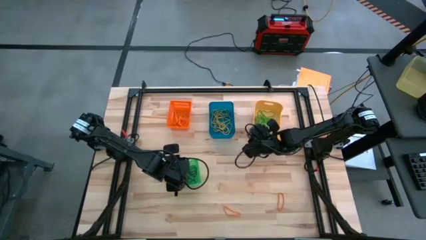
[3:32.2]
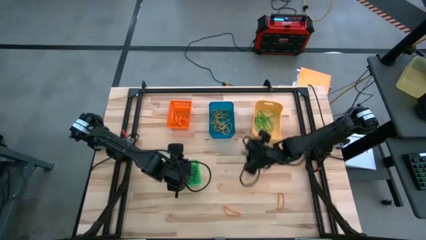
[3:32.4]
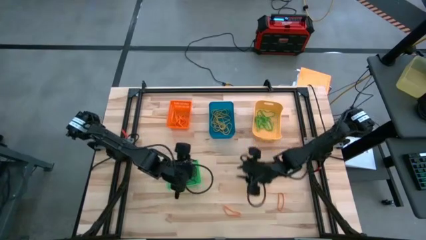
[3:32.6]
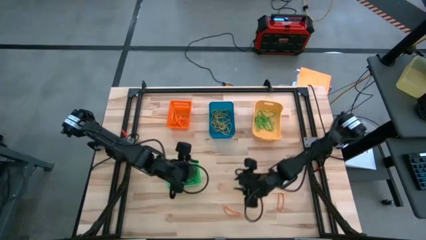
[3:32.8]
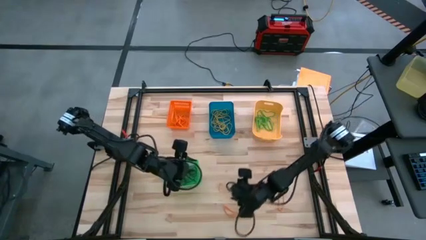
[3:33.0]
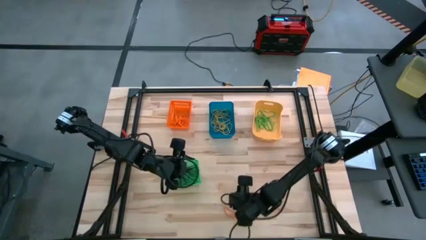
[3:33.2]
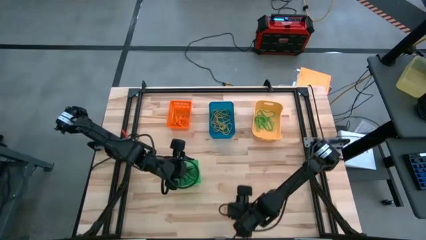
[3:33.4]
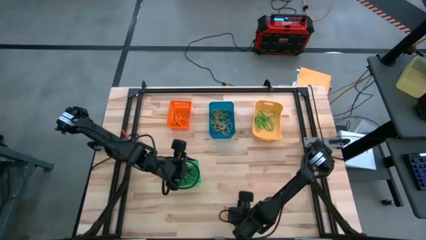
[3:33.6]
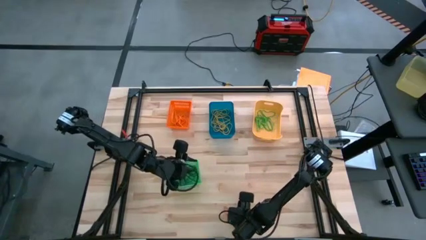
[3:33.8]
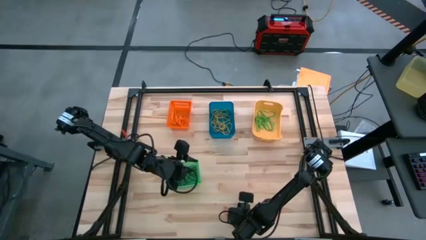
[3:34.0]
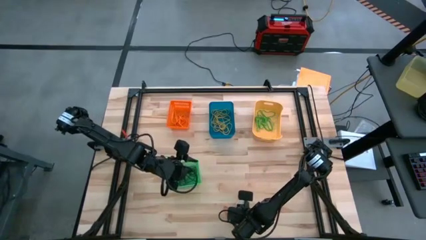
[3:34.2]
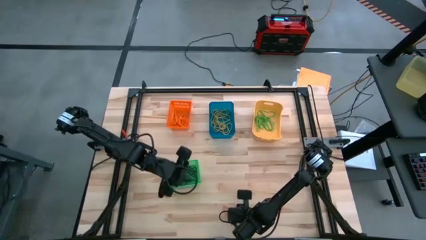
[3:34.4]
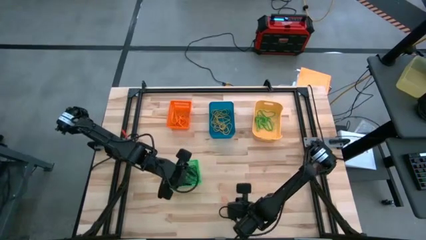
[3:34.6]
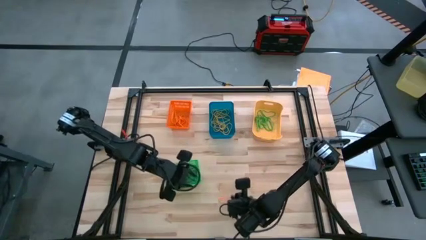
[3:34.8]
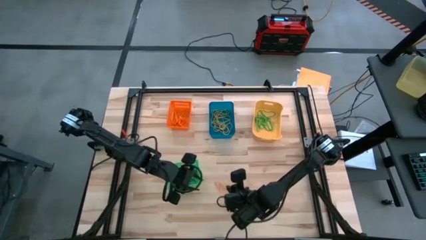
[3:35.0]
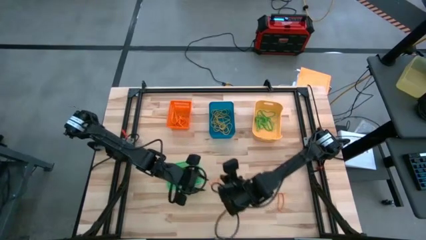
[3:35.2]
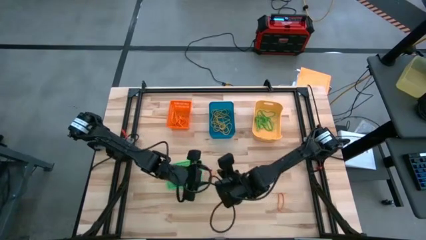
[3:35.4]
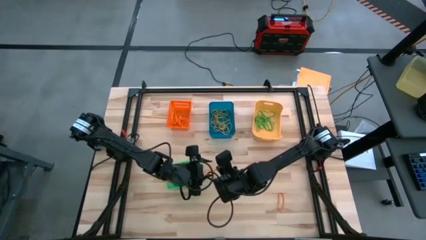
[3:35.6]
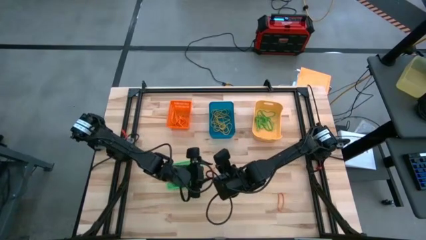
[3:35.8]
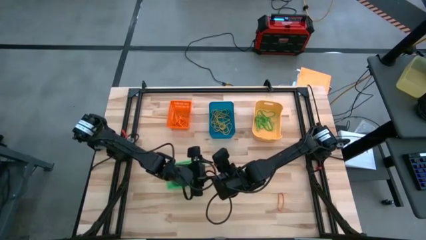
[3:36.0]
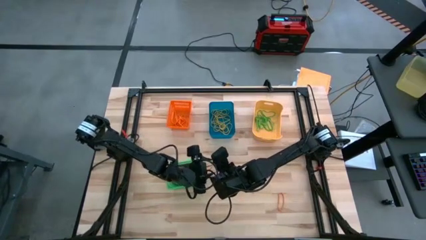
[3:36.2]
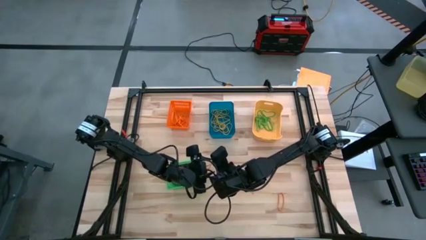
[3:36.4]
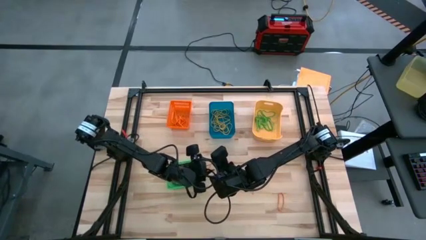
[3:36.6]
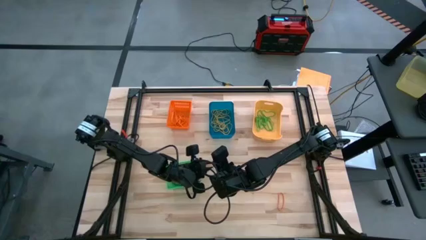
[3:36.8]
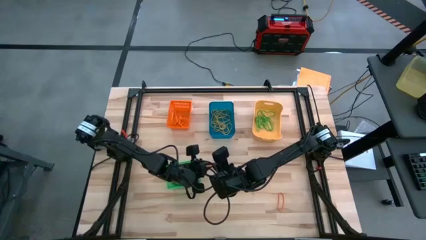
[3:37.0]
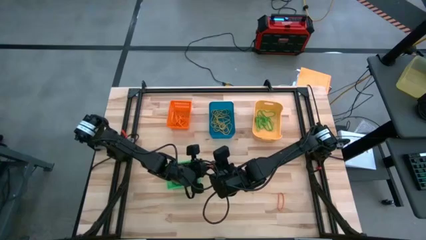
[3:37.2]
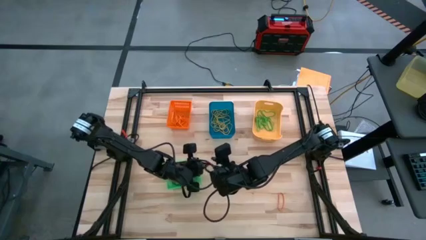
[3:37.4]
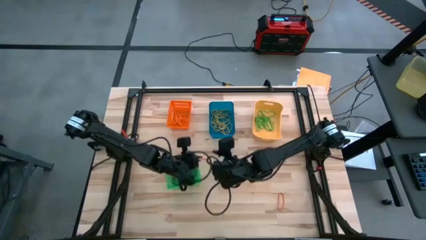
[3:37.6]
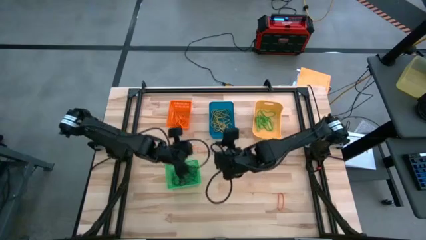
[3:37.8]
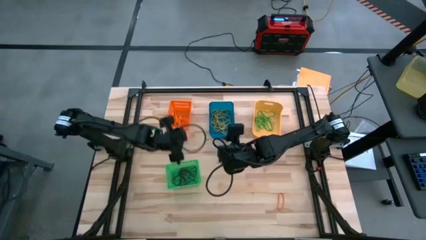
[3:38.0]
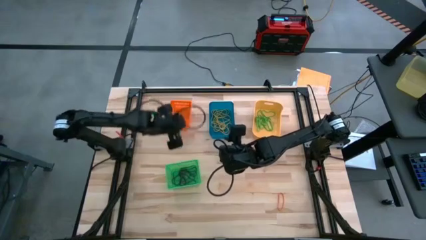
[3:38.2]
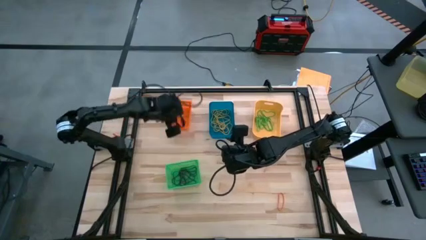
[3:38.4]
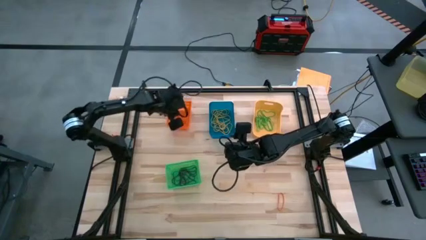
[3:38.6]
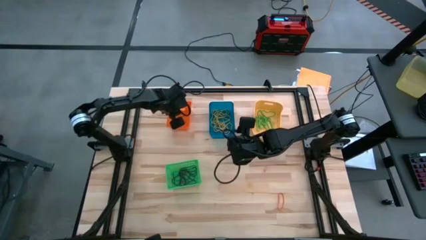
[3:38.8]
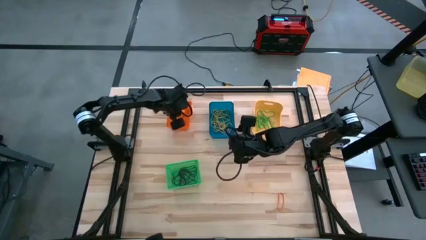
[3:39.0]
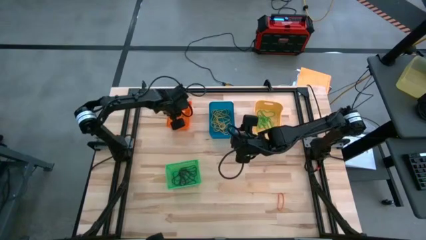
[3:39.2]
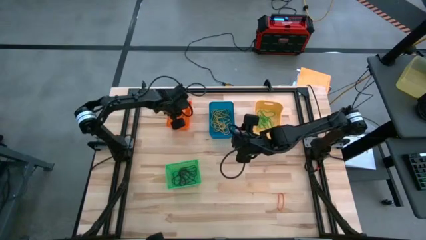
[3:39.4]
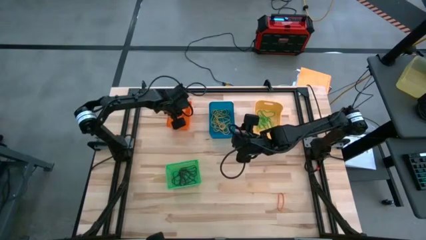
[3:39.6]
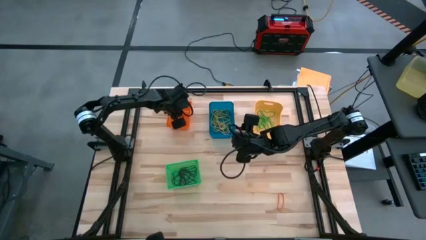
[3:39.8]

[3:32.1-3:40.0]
Task: Sort rubber bands into baskets
Put the orange rubberband into the orange bin

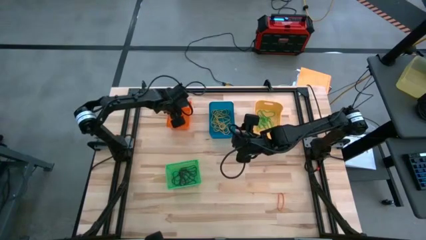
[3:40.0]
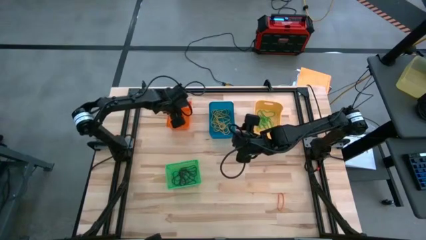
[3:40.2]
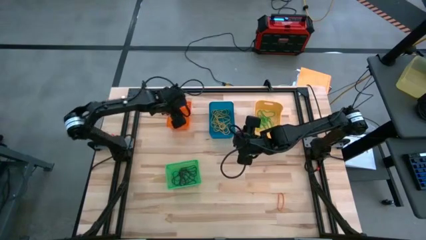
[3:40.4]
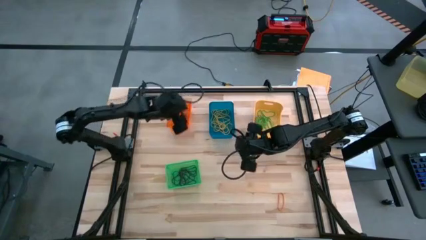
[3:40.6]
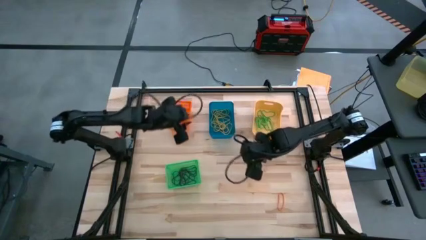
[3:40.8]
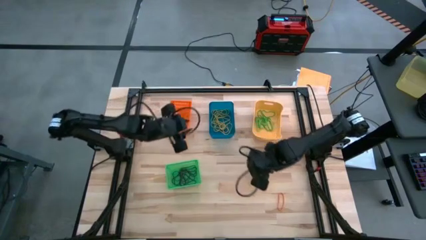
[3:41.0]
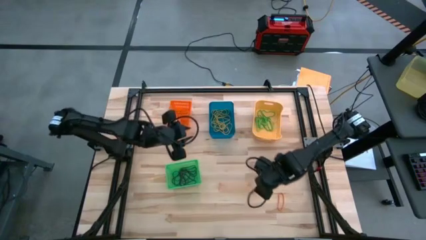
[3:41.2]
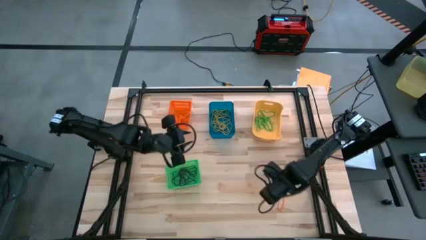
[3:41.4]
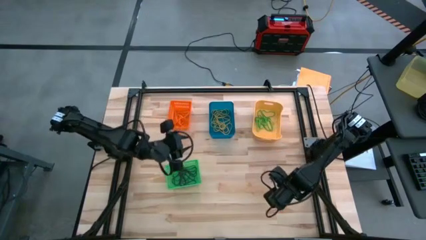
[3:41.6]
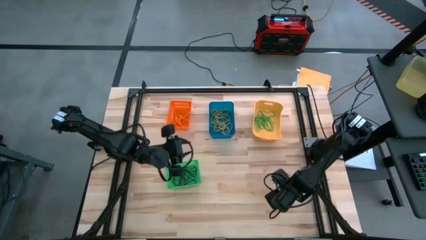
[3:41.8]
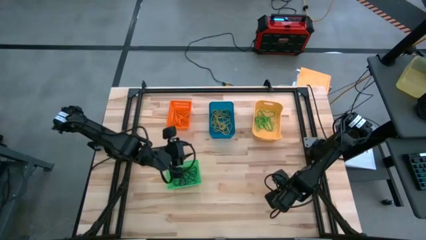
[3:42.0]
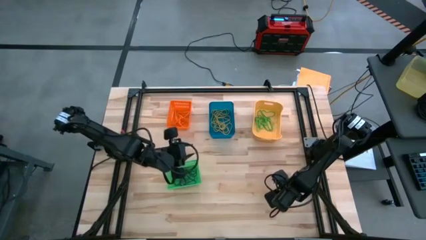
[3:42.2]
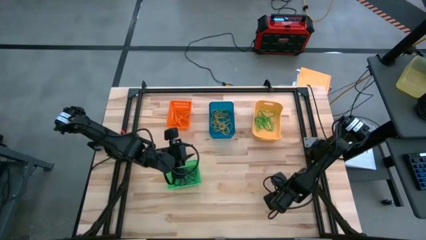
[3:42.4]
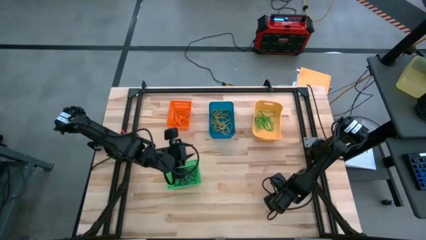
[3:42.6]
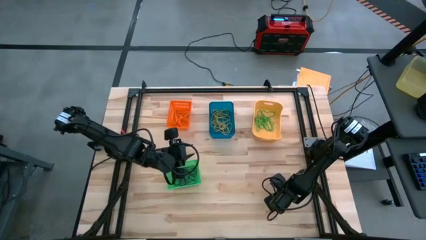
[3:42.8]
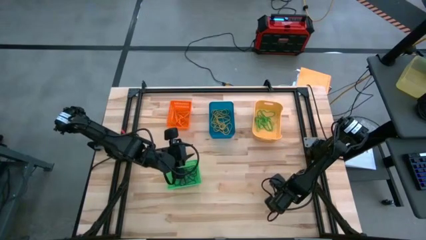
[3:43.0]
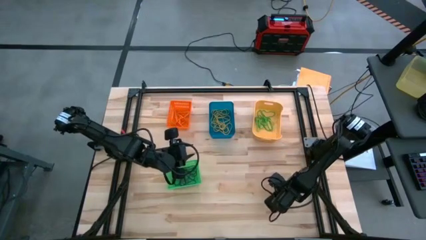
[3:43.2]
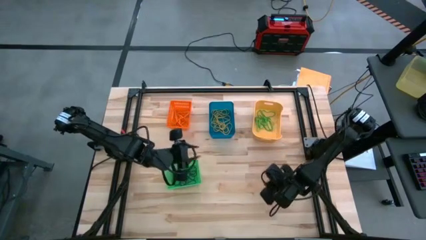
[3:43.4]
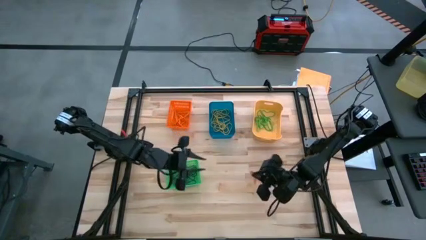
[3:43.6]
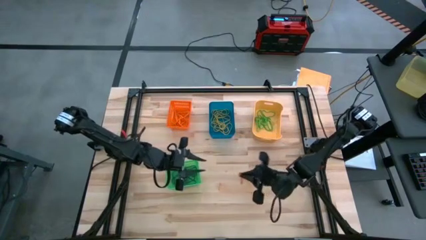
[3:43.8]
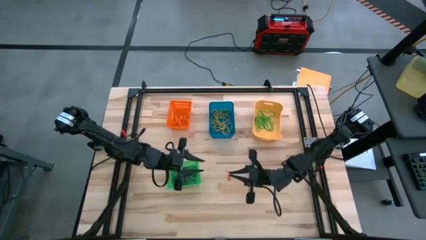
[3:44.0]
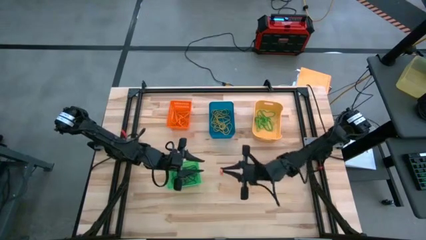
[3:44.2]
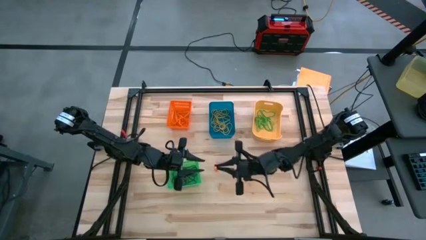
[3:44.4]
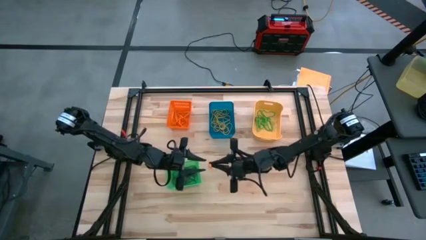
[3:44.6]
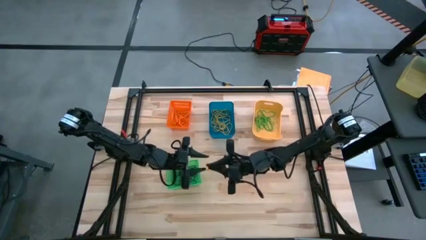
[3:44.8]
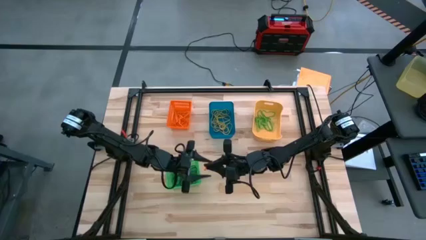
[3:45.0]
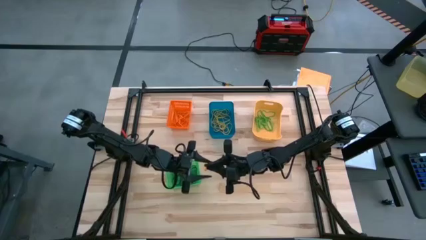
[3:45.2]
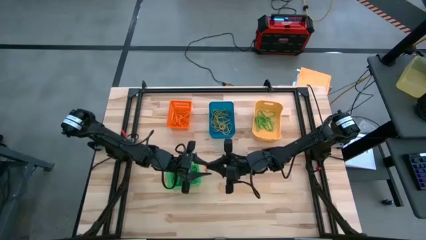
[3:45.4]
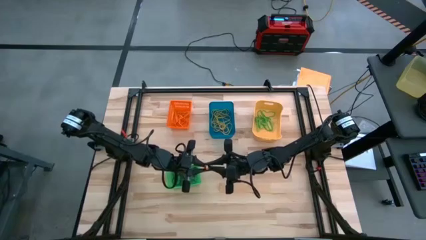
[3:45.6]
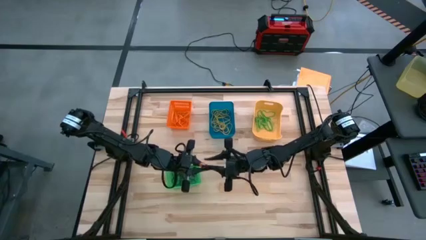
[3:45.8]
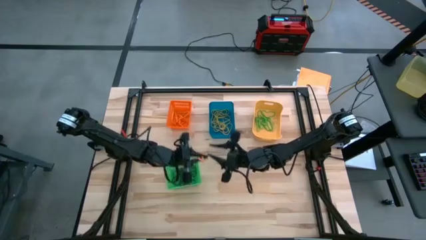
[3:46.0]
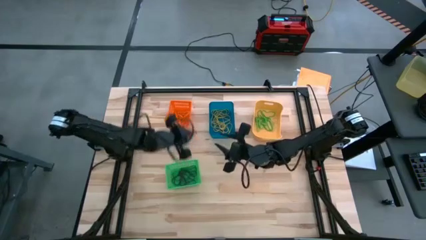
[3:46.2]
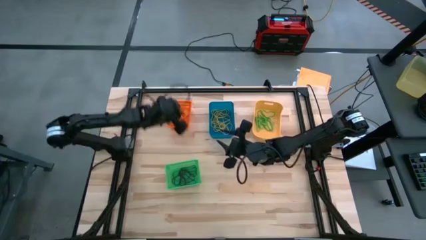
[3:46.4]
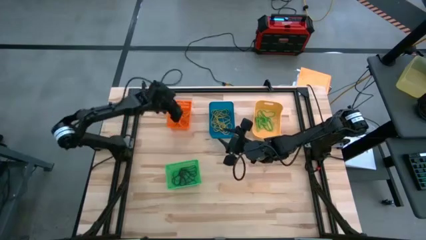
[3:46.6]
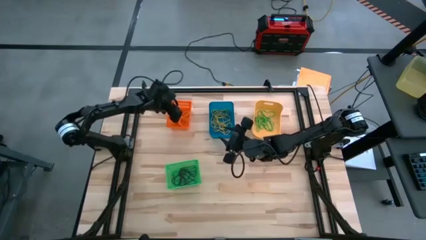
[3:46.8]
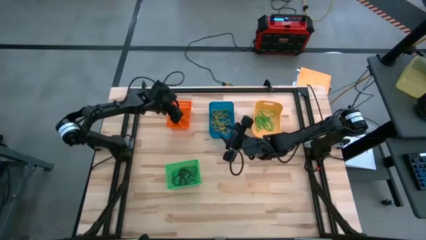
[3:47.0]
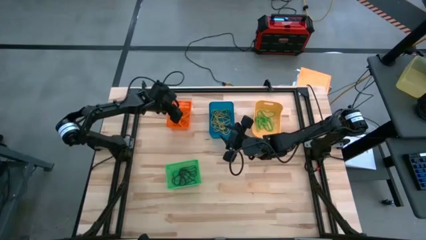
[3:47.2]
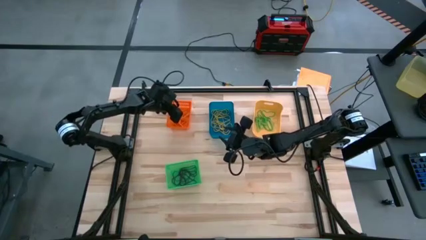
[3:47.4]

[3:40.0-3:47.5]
Put the orange rubberband into the orange bin

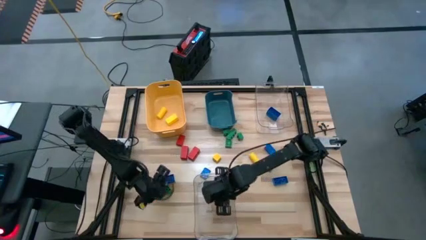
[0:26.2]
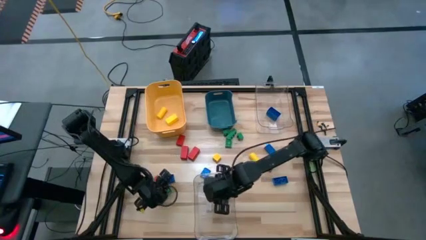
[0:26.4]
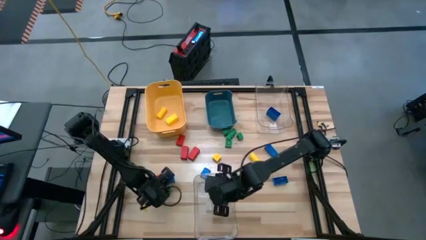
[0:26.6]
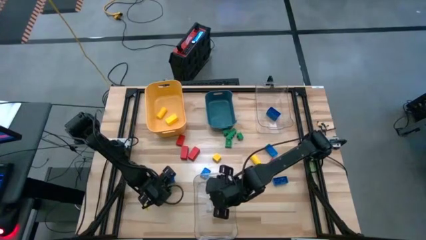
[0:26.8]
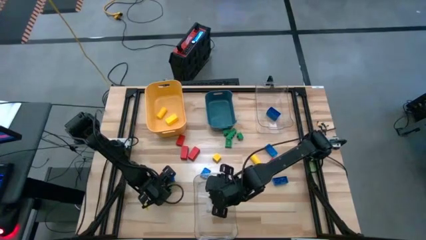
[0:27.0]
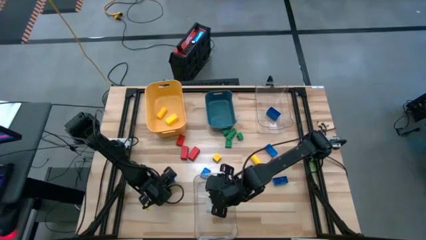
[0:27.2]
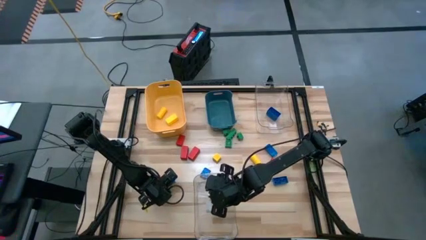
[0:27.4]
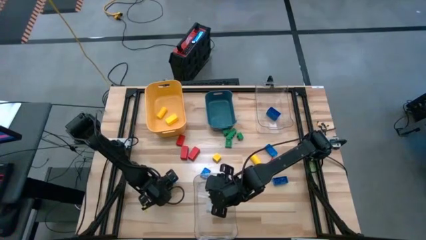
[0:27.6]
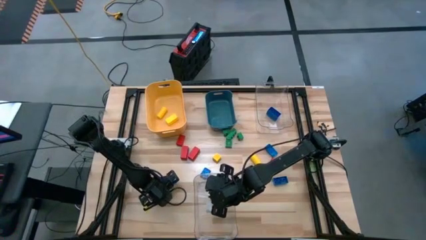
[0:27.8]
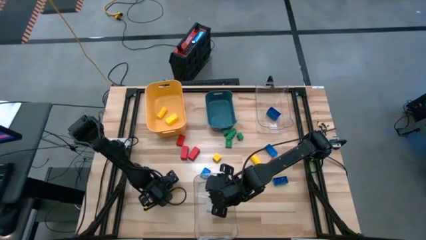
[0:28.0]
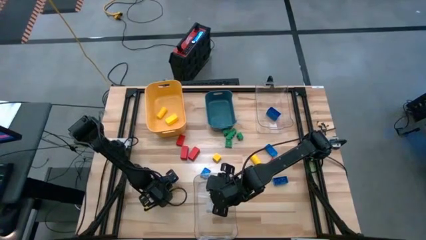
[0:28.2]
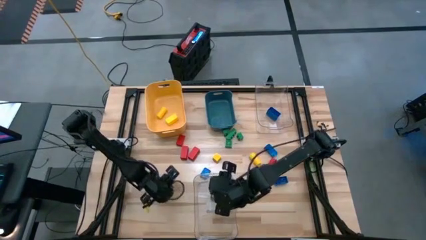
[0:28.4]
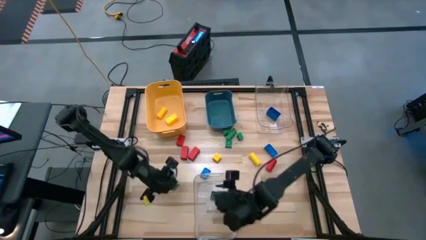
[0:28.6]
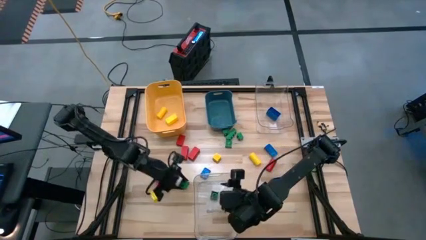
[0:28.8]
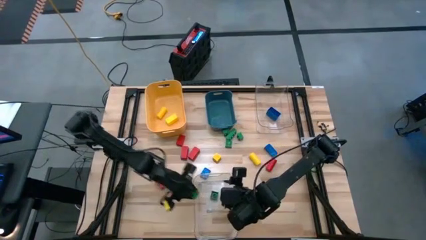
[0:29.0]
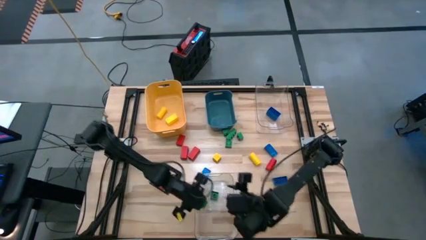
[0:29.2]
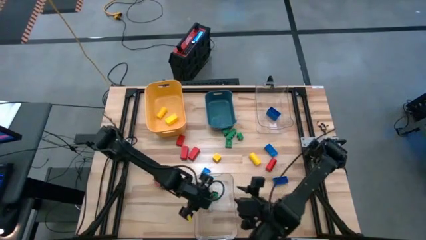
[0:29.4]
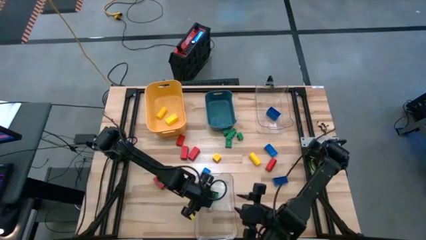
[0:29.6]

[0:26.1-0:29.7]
Task: Sort blocks
Put the green game piece into the bottom transparent bin
